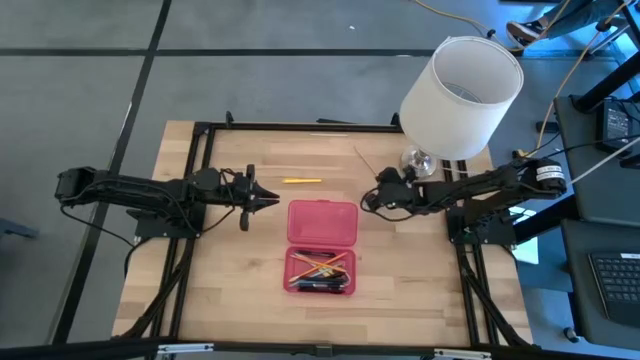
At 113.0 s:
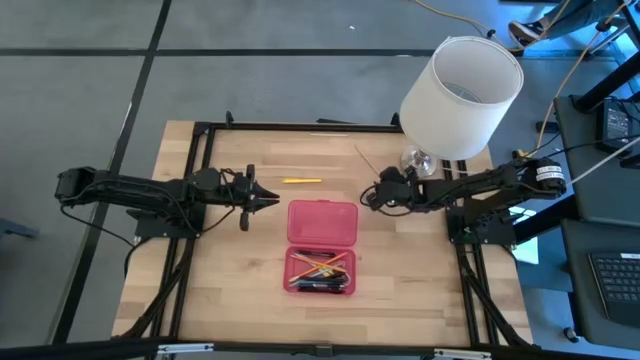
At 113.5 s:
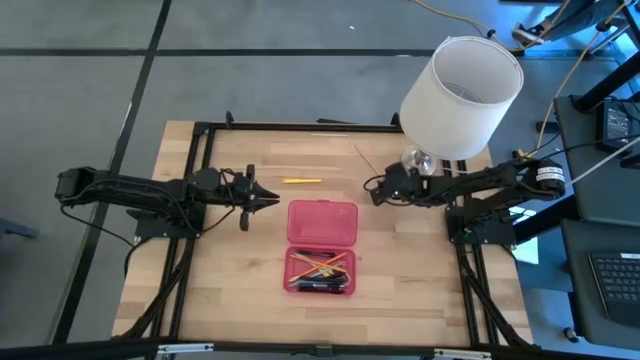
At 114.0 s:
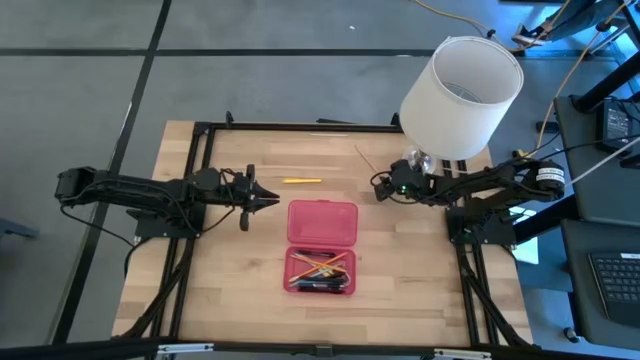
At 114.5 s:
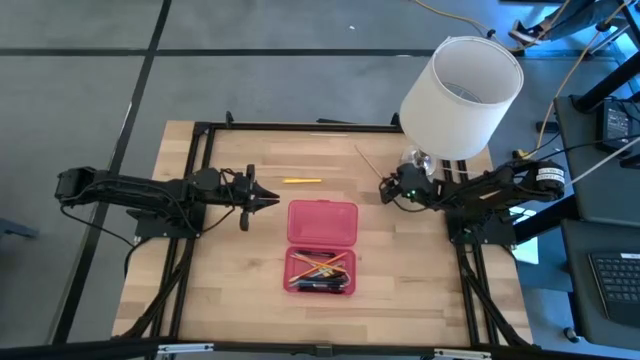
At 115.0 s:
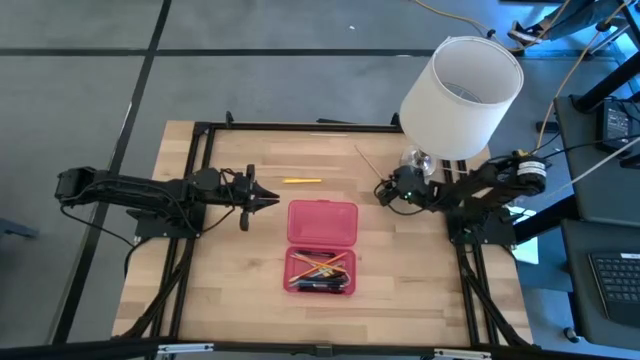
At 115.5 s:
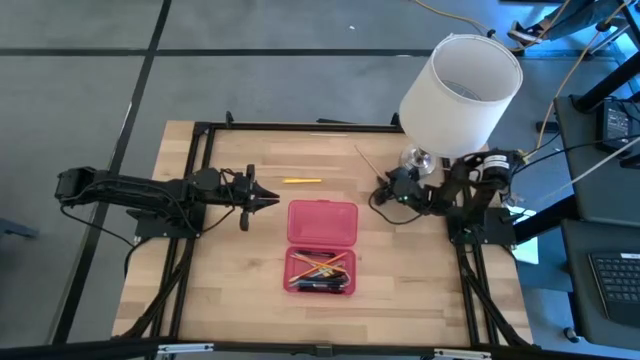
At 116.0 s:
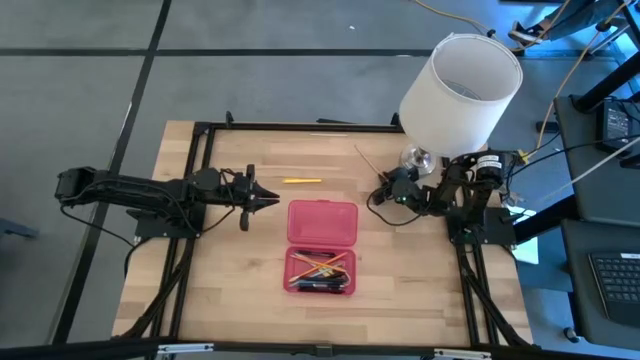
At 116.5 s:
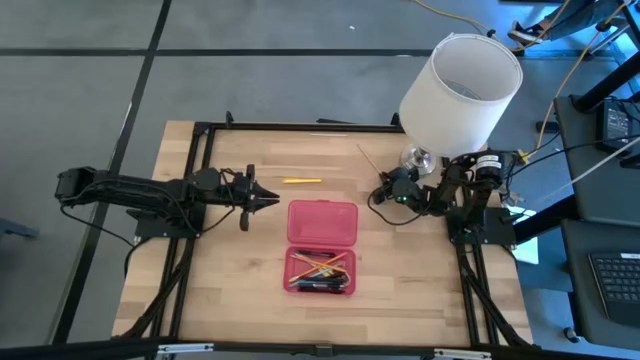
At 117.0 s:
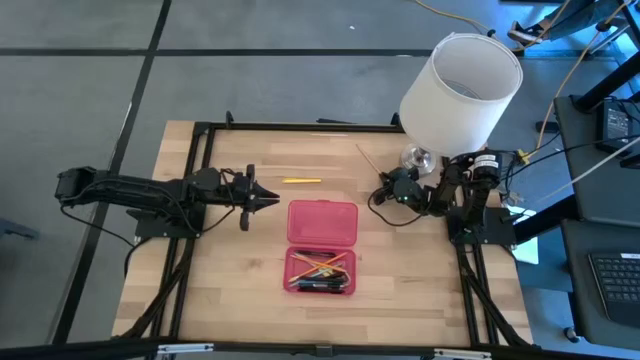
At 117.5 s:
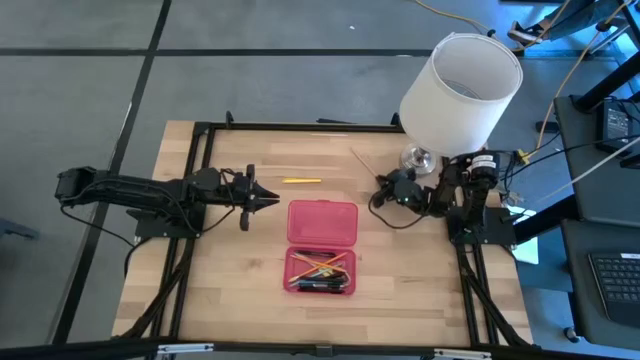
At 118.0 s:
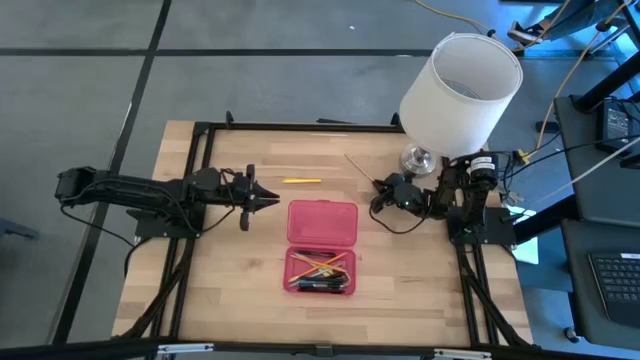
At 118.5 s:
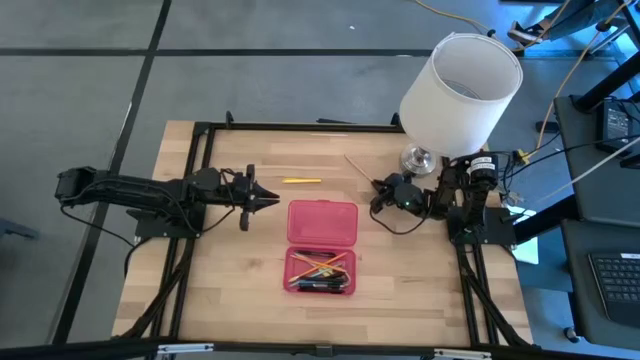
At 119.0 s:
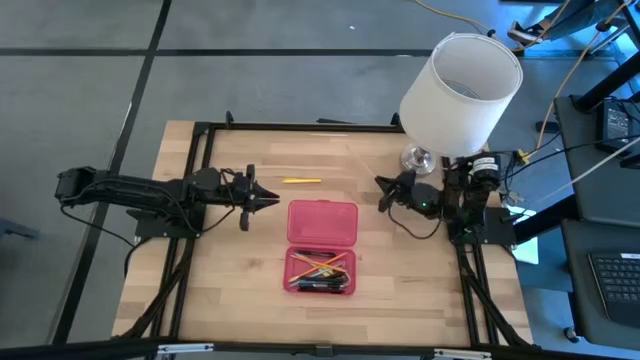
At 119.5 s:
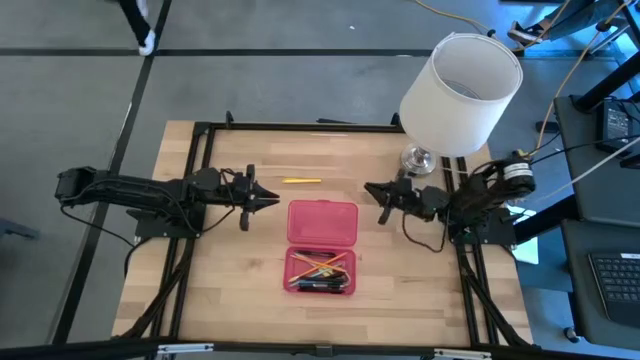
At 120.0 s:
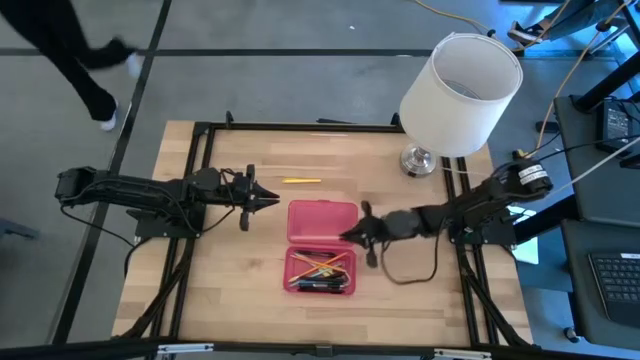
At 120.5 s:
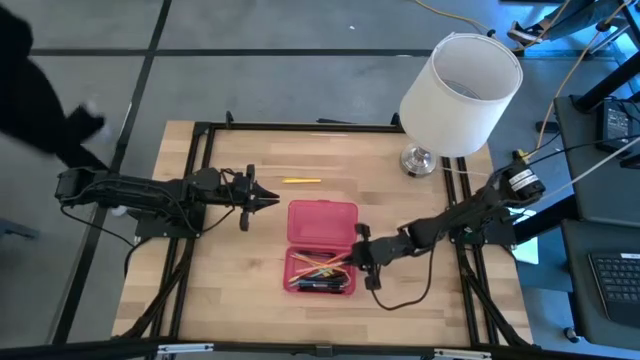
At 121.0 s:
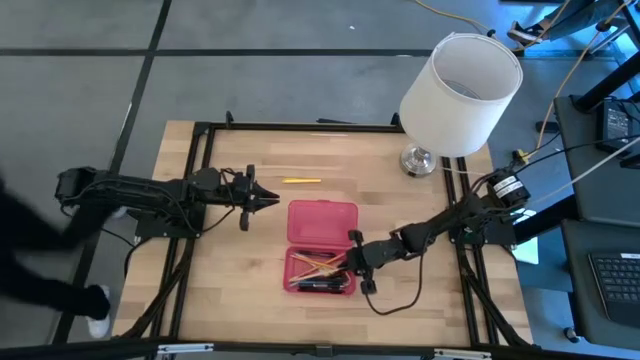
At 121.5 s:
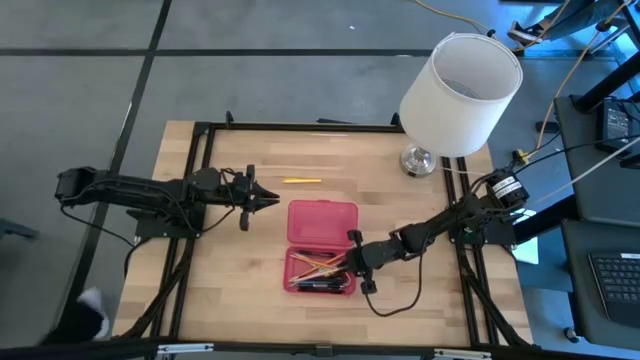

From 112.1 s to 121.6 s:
Task: Pick & place school supplies into a supply box
Put the brown pencil into the red supply box

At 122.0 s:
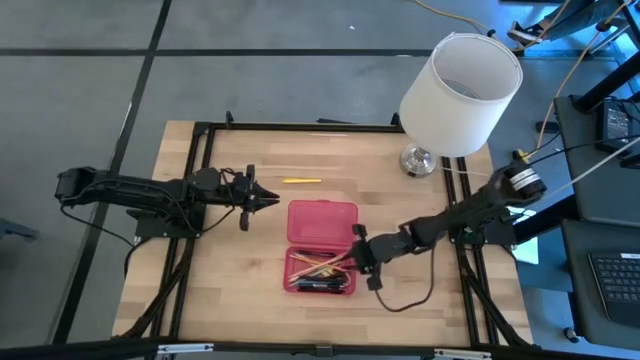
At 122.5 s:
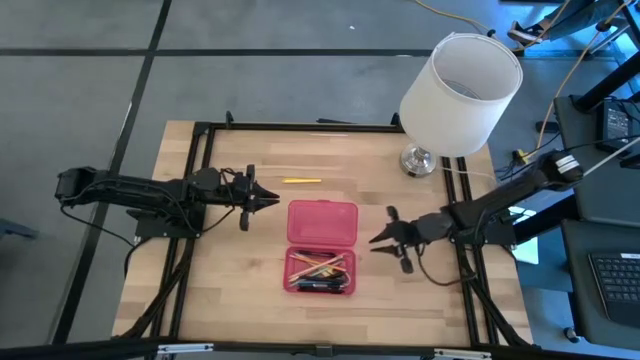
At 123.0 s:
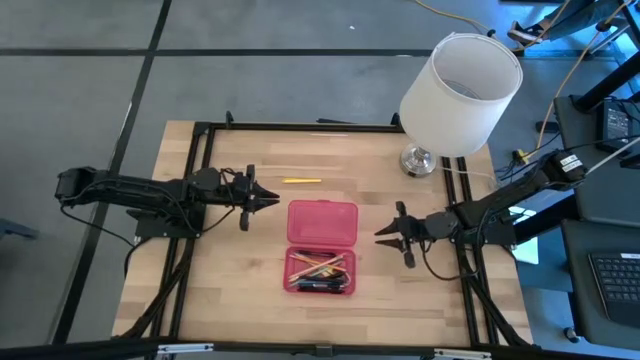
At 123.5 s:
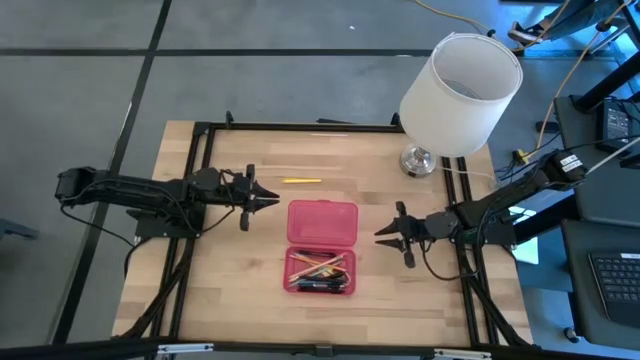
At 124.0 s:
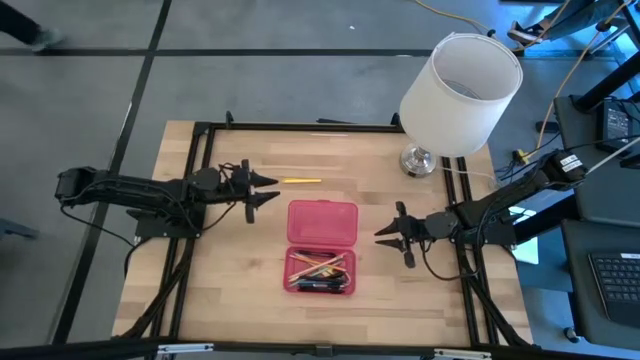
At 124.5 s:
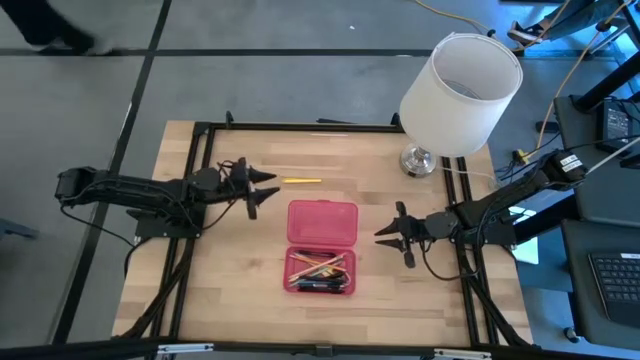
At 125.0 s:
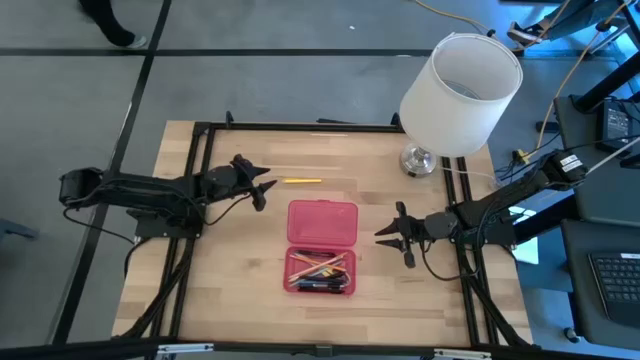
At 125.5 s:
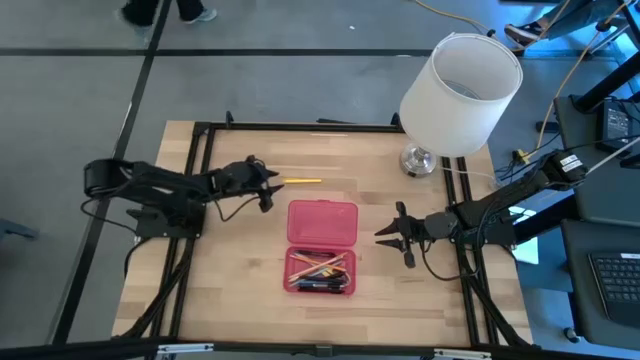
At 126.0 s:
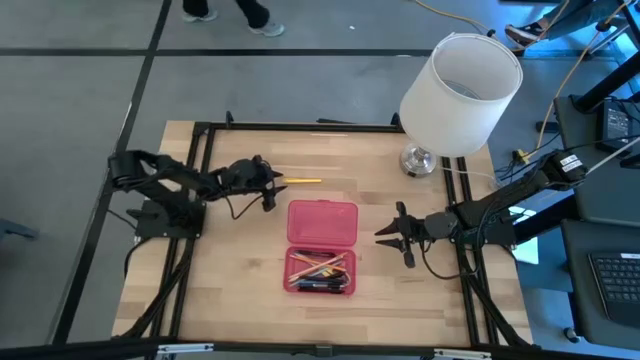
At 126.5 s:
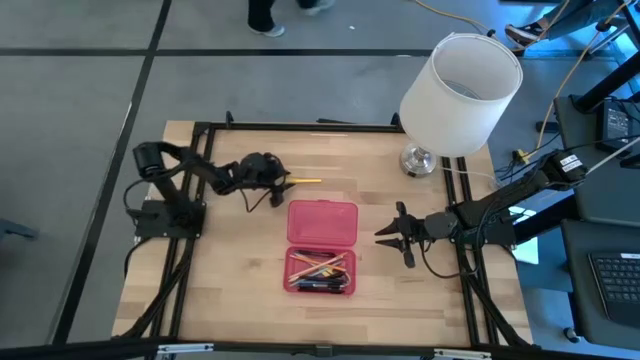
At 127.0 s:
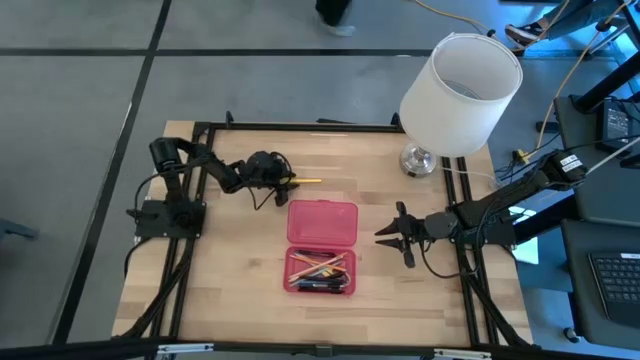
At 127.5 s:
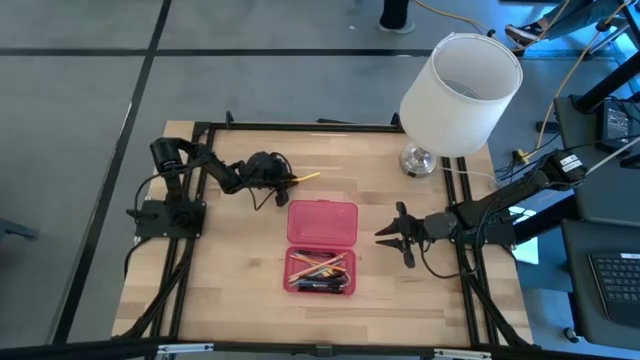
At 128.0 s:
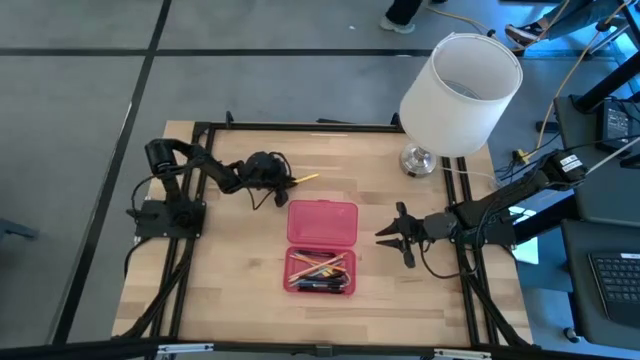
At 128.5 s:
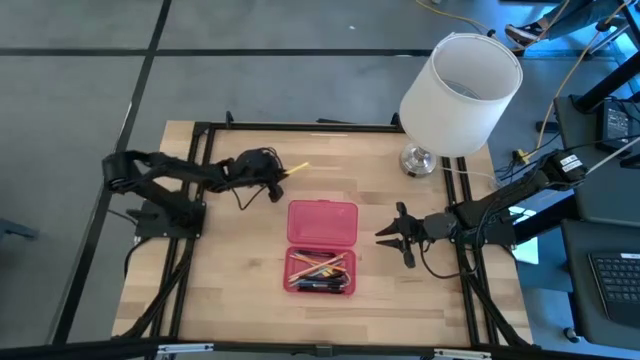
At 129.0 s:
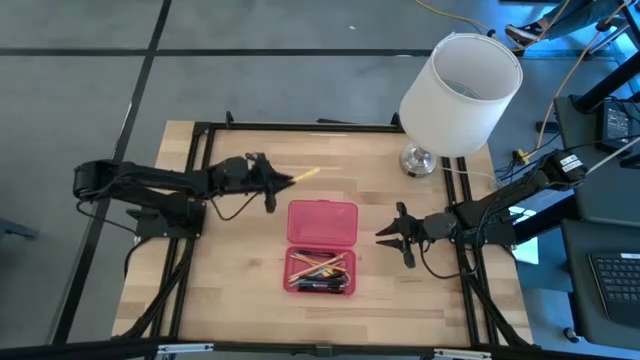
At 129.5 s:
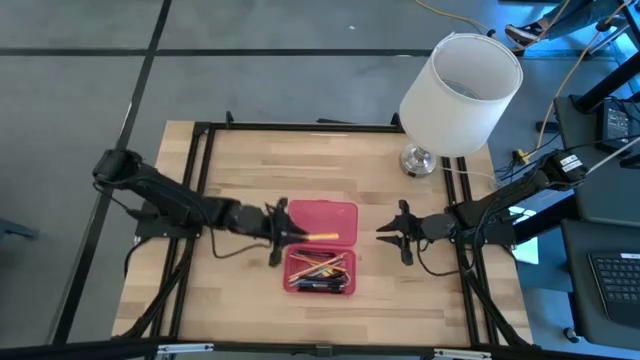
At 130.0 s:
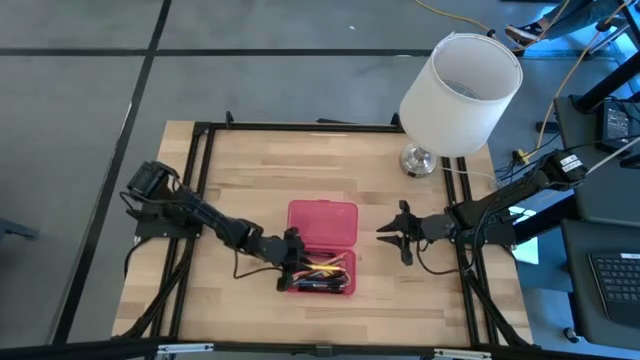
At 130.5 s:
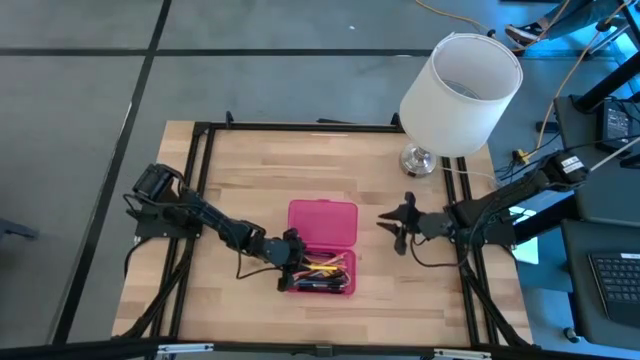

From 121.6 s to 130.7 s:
Put the yellow pen into the red supply box

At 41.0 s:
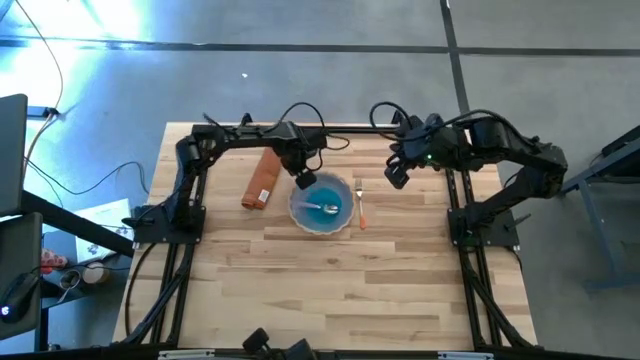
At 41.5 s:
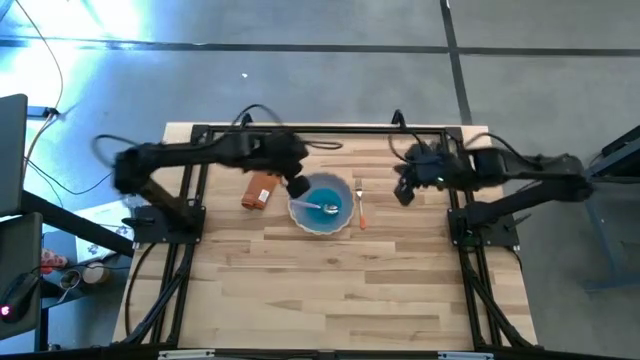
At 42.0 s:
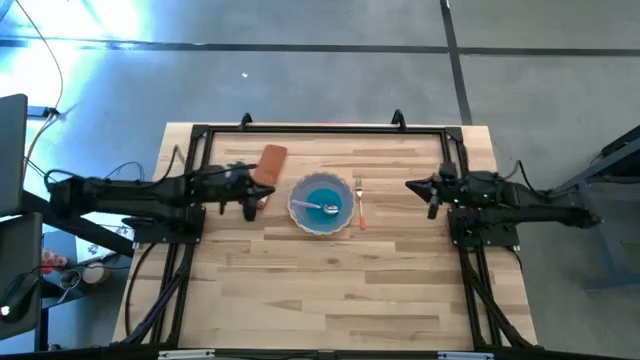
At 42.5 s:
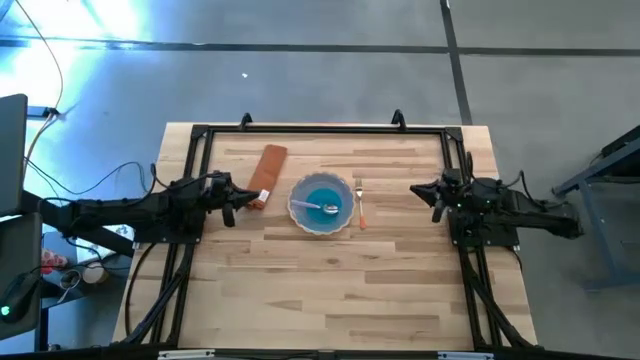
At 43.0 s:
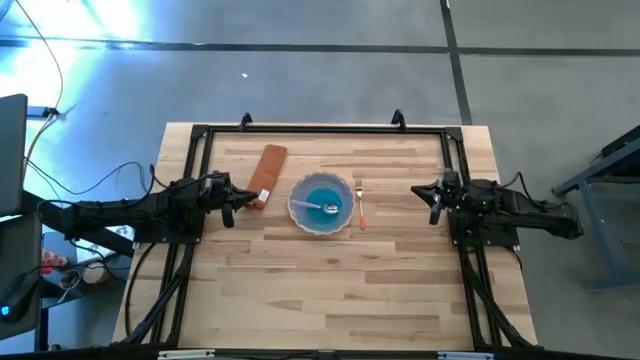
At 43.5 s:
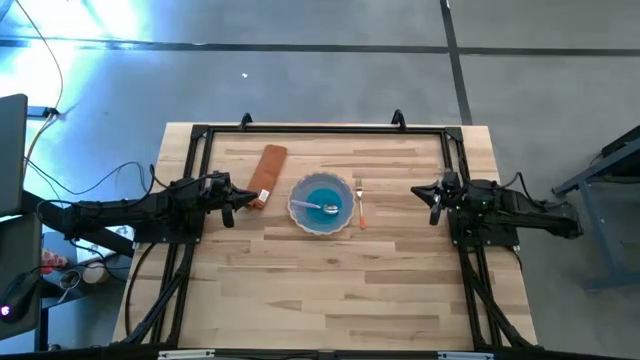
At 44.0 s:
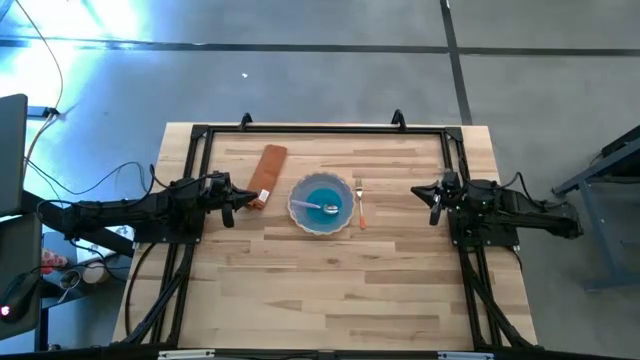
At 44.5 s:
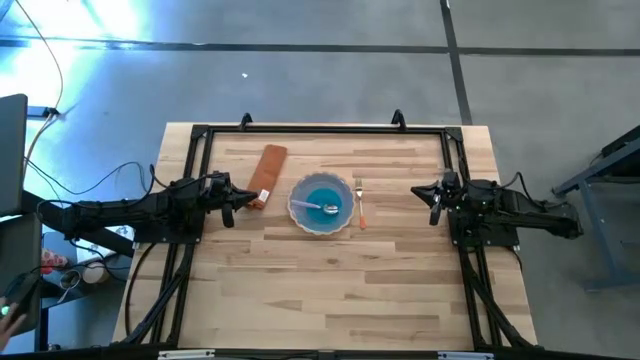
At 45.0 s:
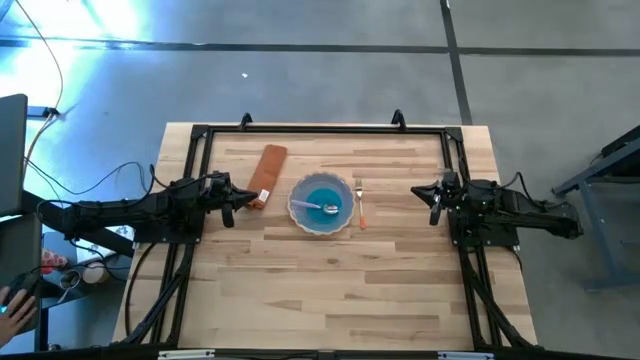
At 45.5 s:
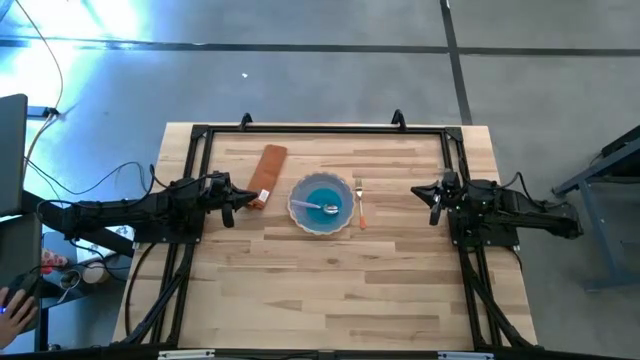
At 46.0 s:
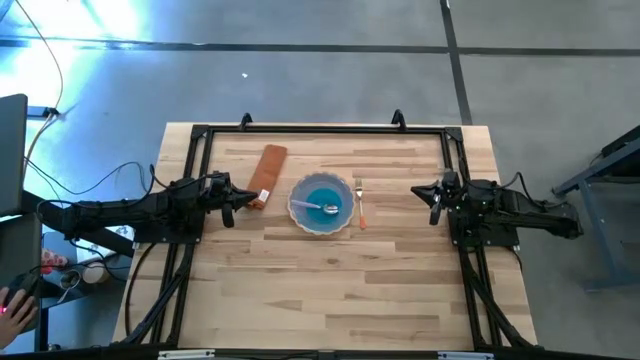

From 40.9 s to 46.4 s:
Task: Set table place
Return to Home Position
